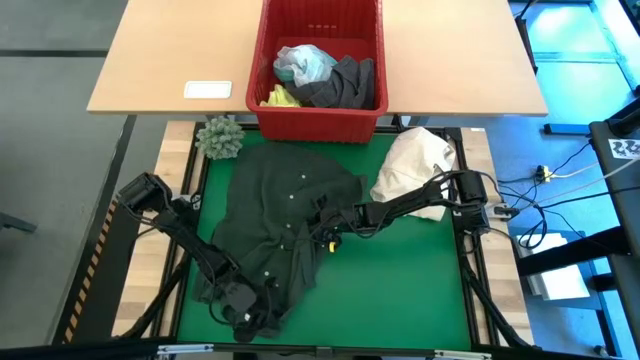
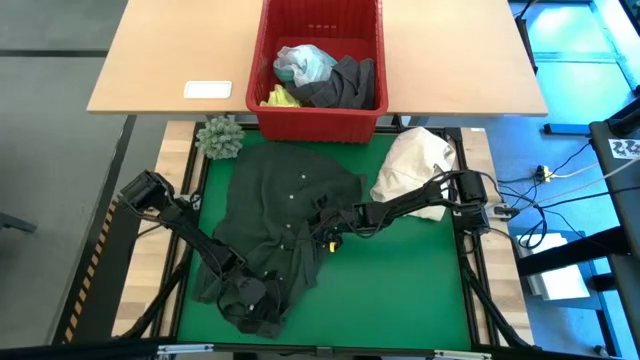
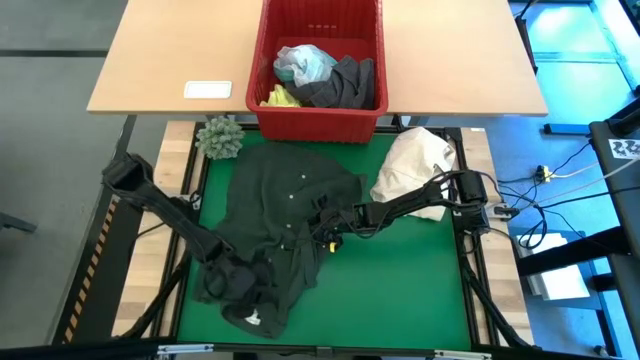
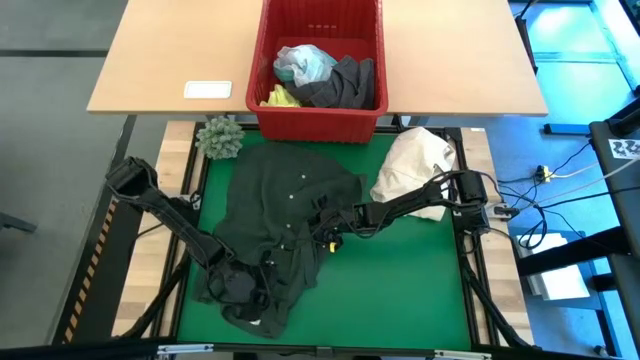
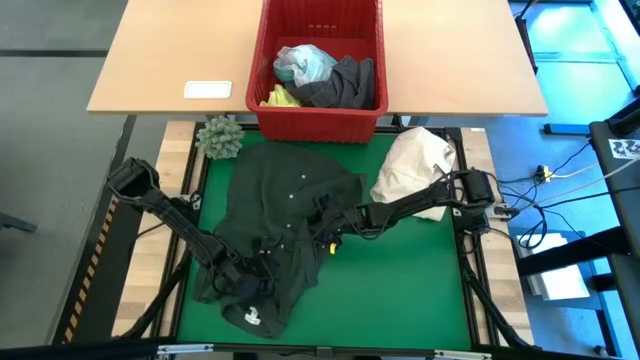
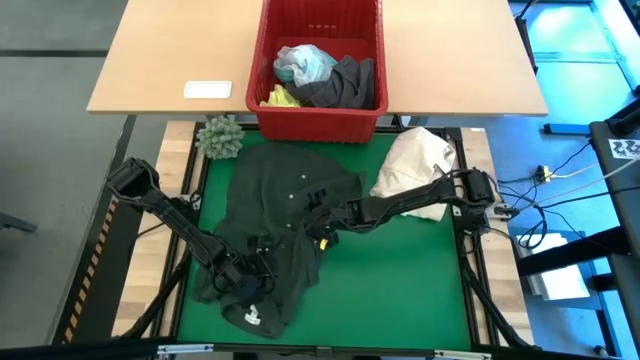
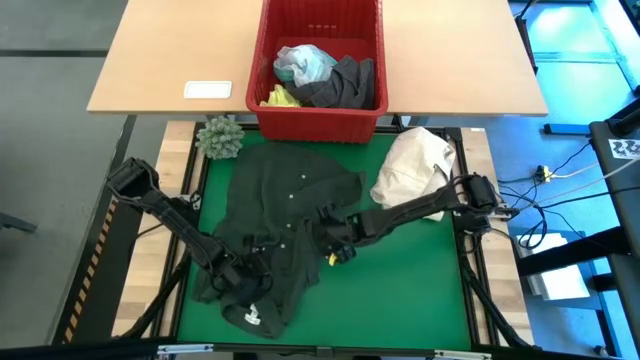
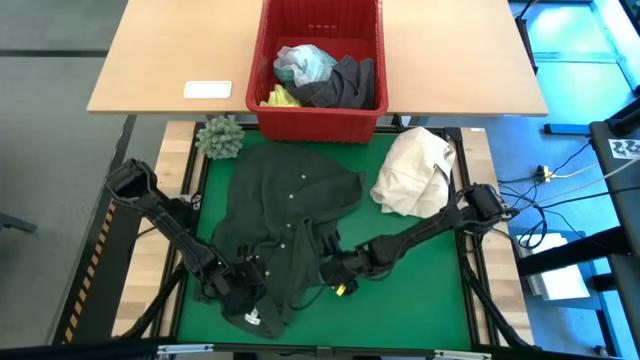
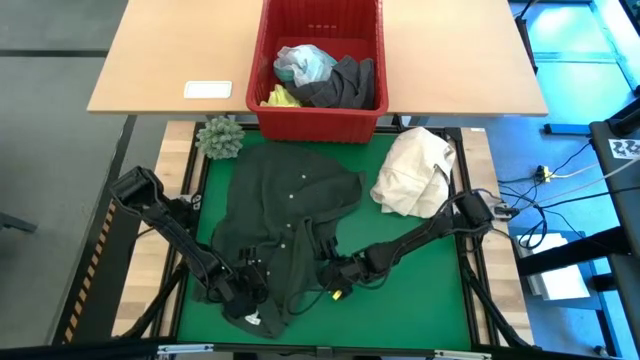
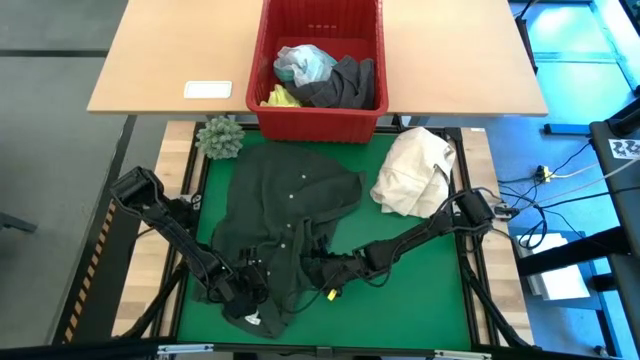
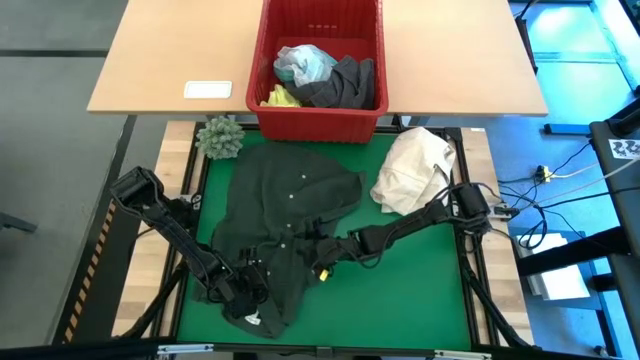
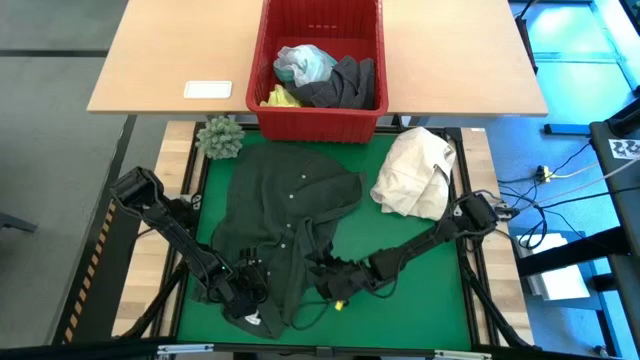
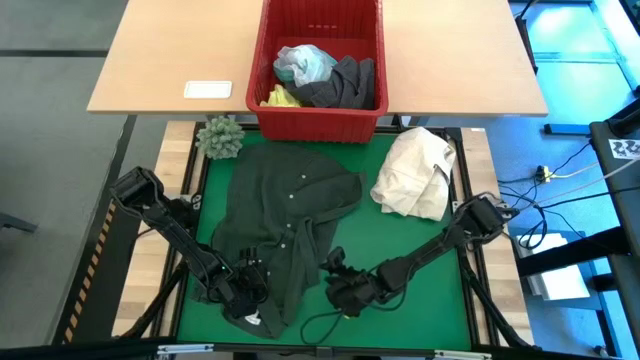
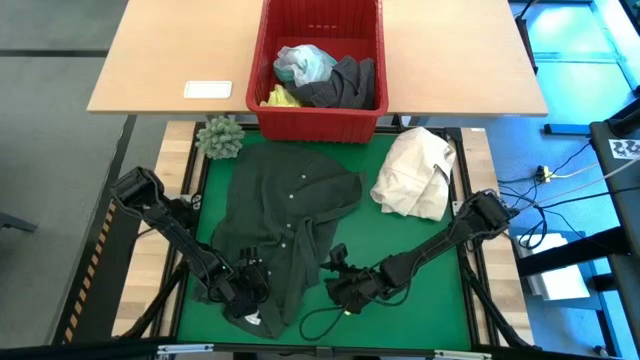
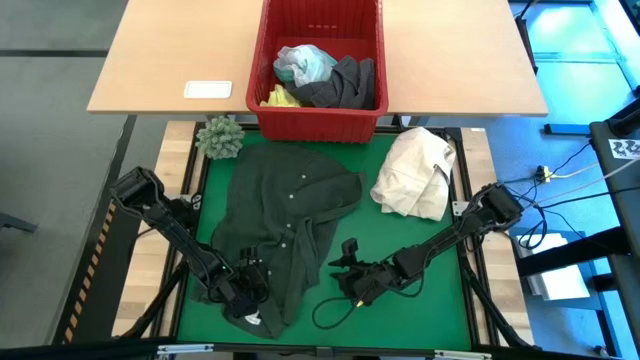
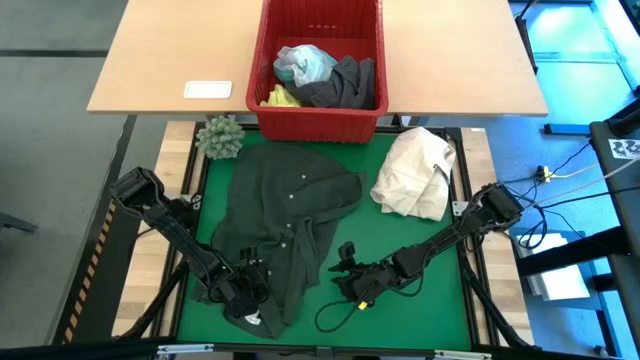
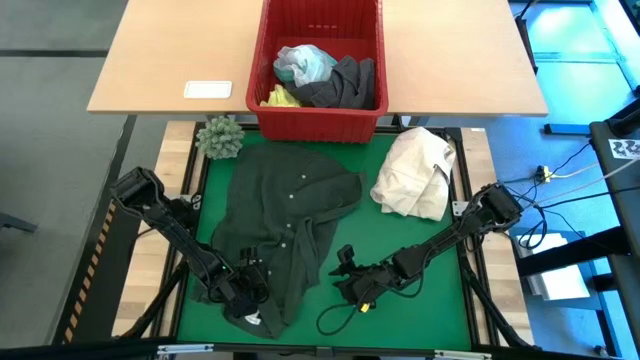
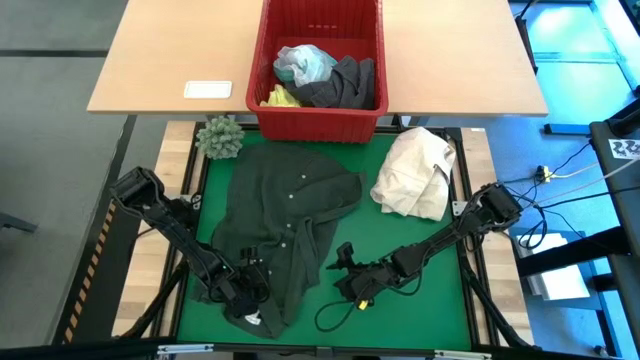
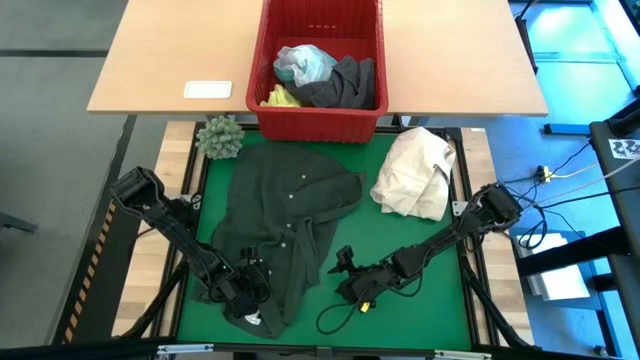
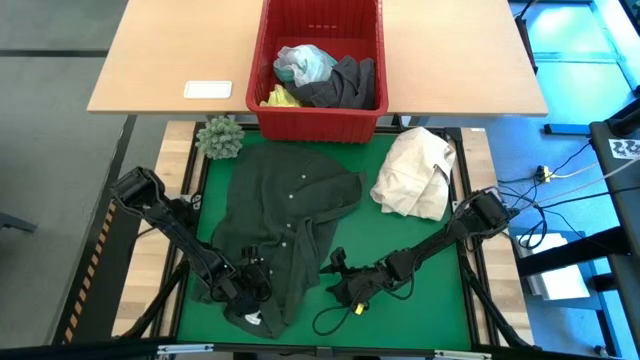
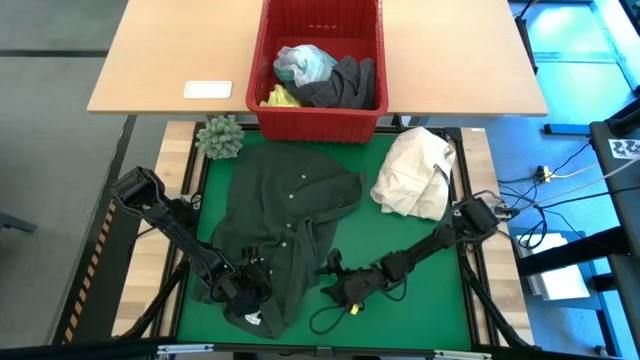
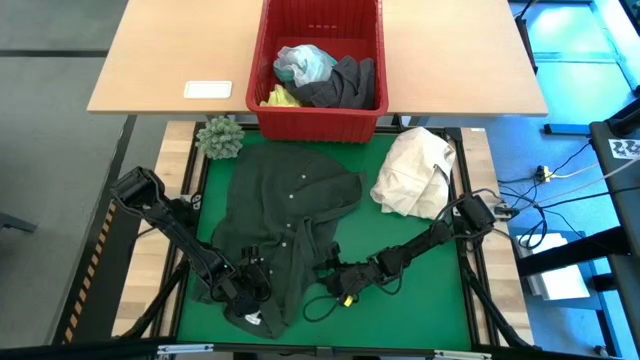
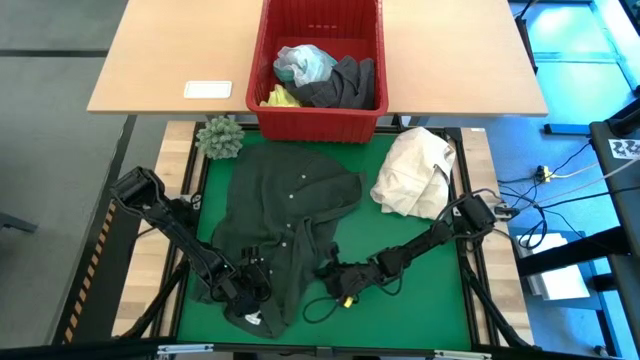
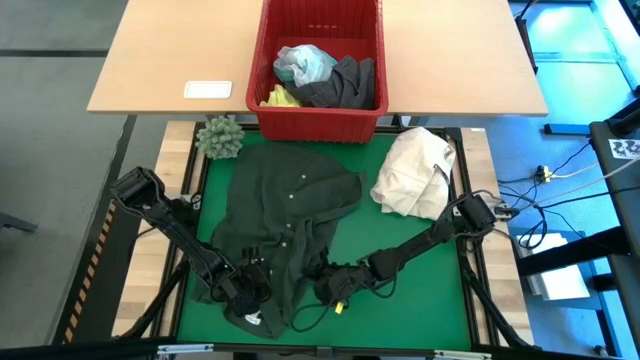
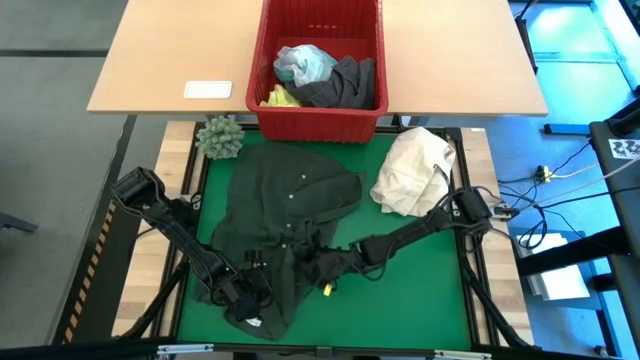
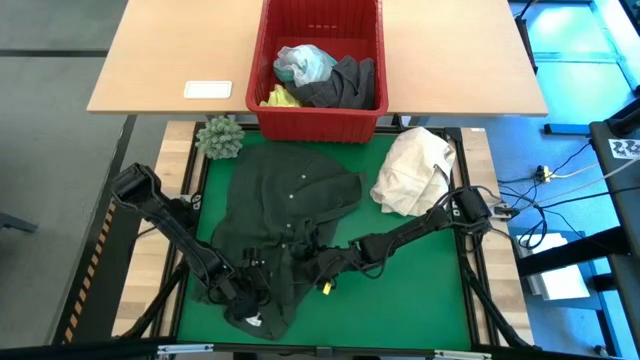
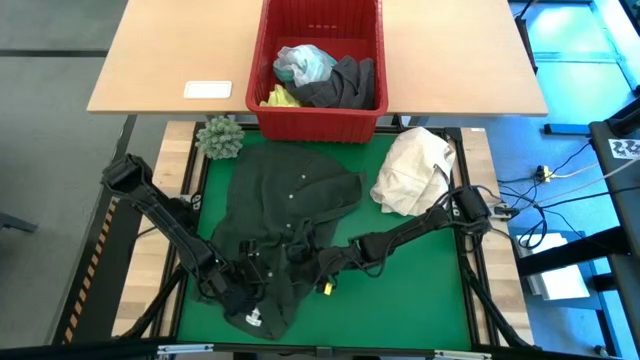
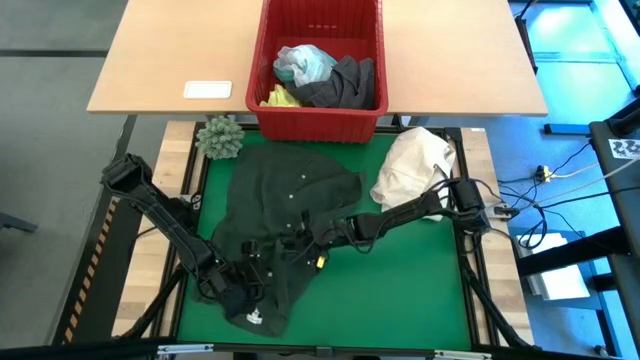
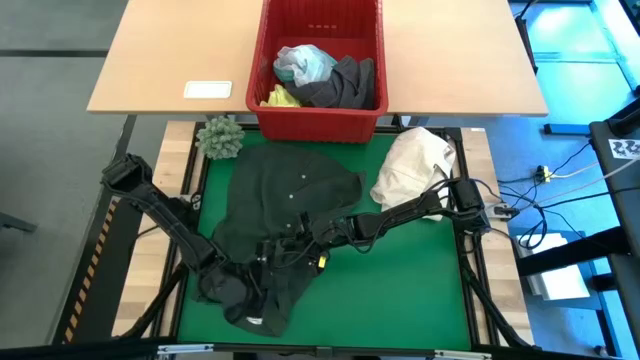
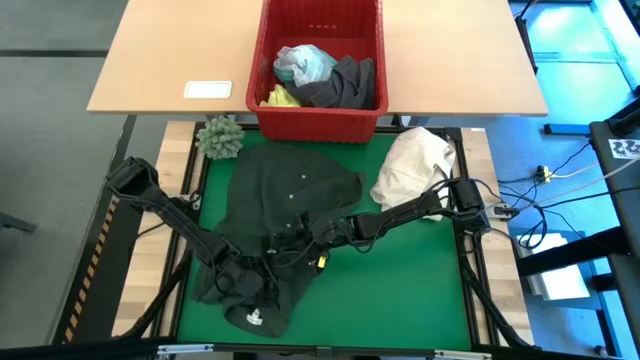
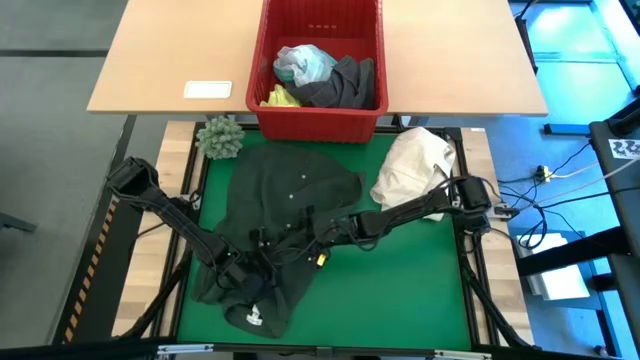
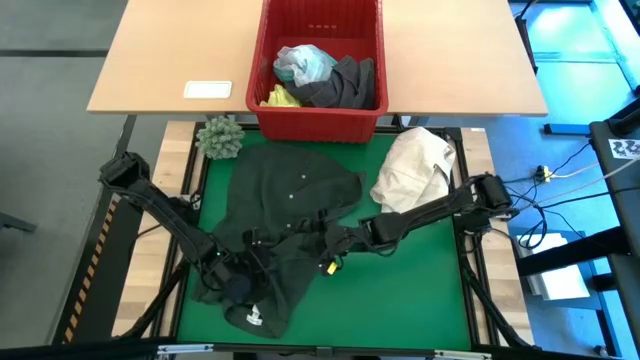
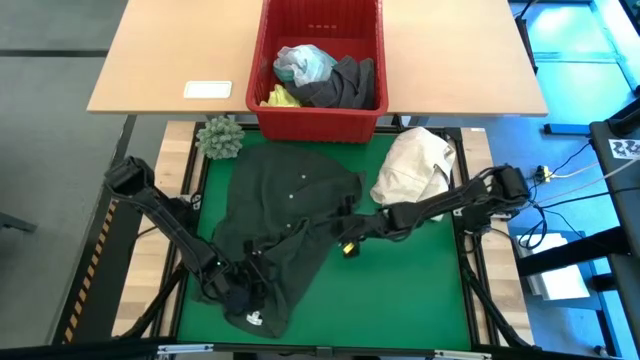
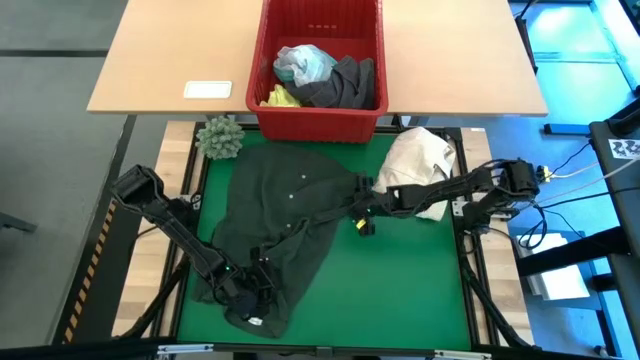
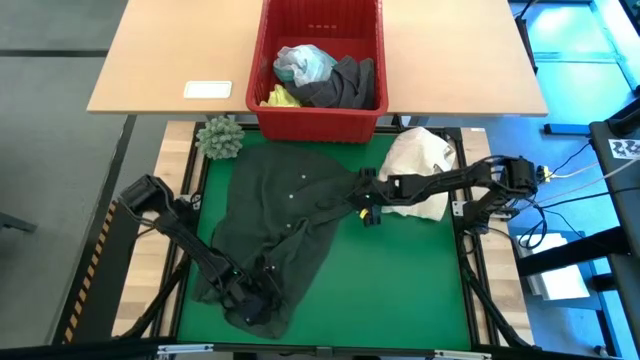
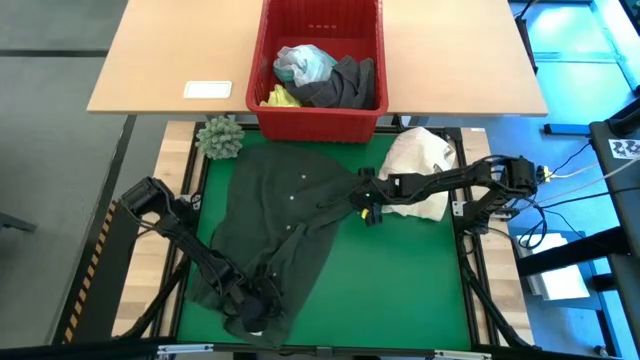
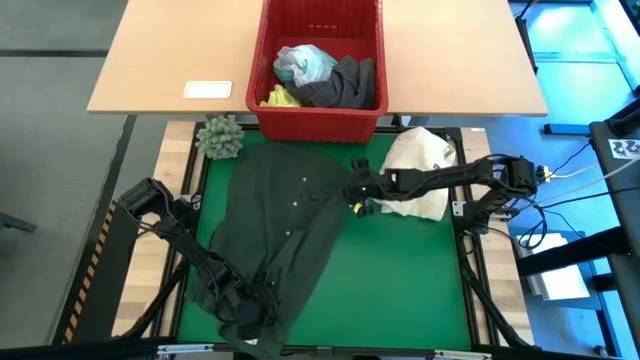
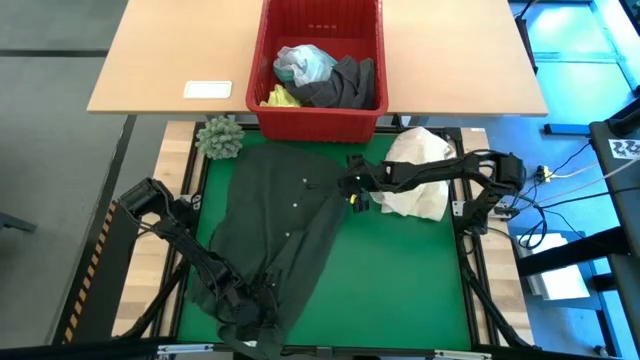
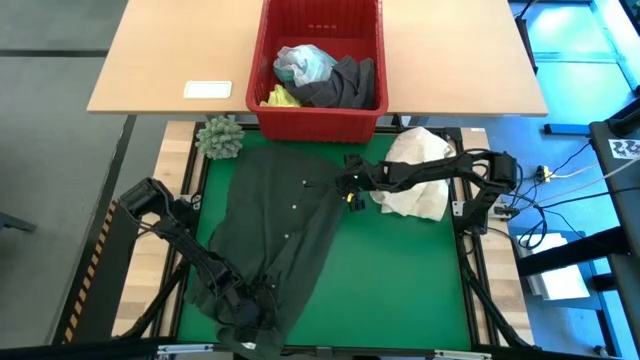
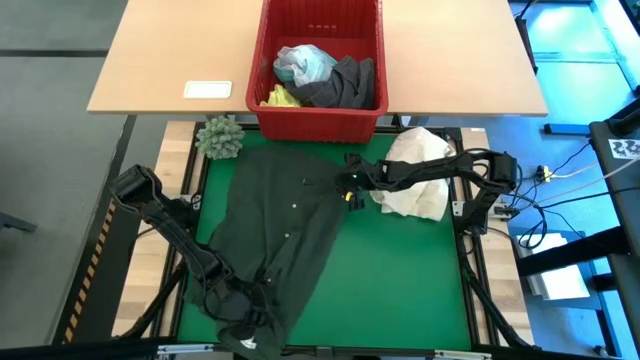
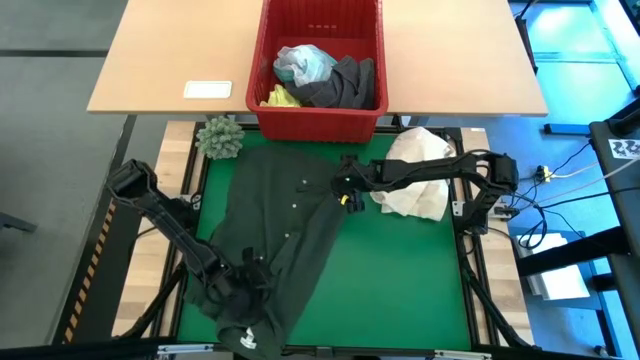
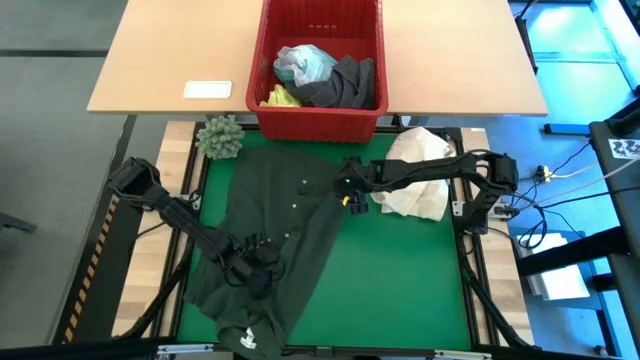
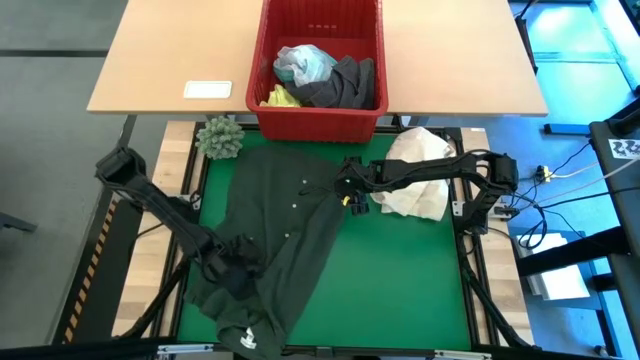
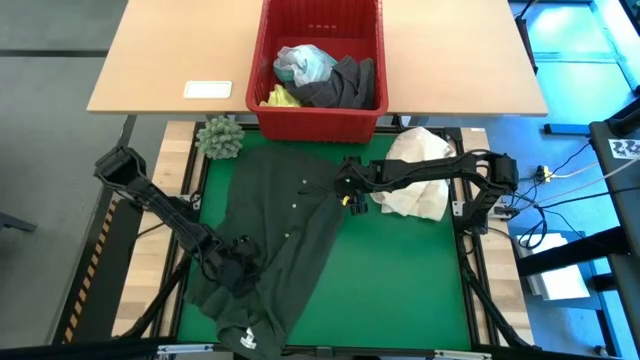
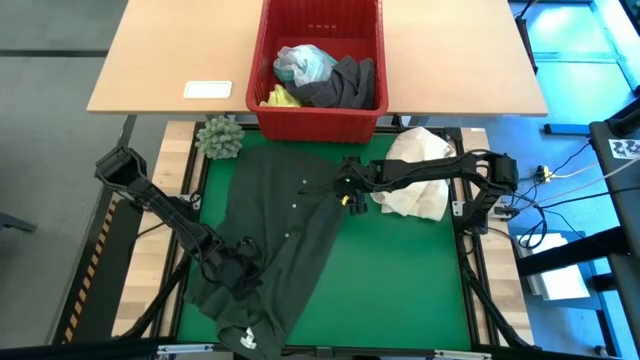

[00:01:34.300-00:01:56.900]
Task: Fold Laundry from Bin
Fold the dark green polo
